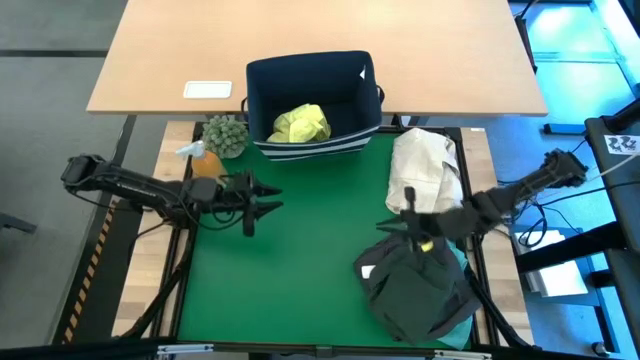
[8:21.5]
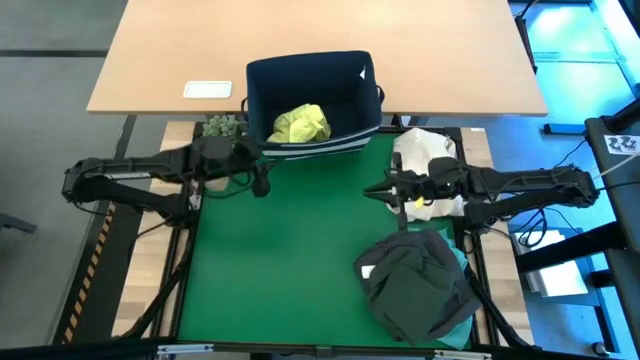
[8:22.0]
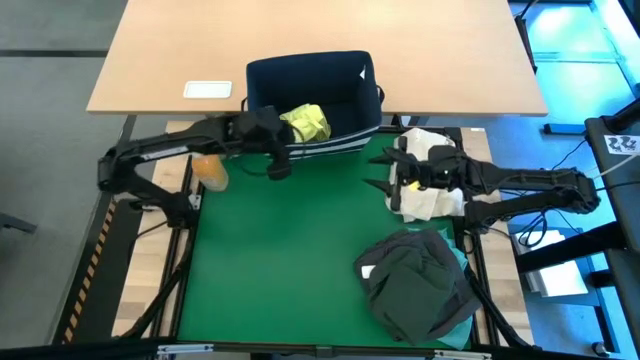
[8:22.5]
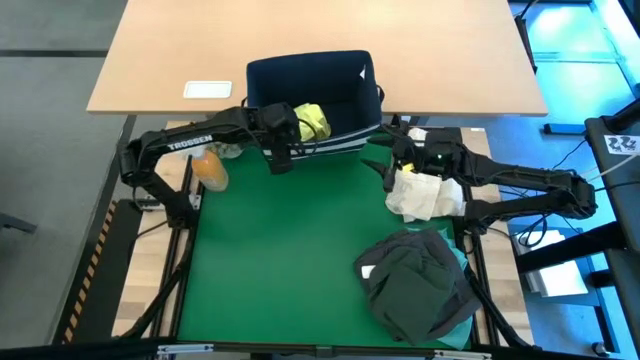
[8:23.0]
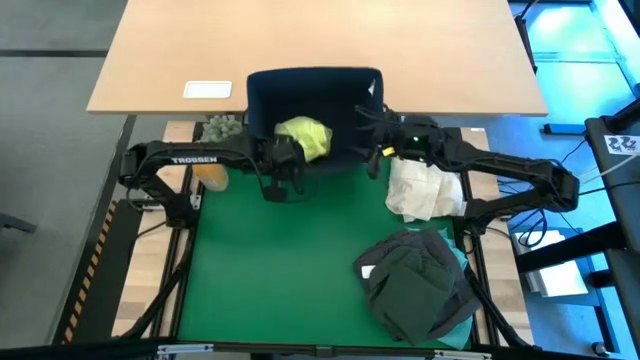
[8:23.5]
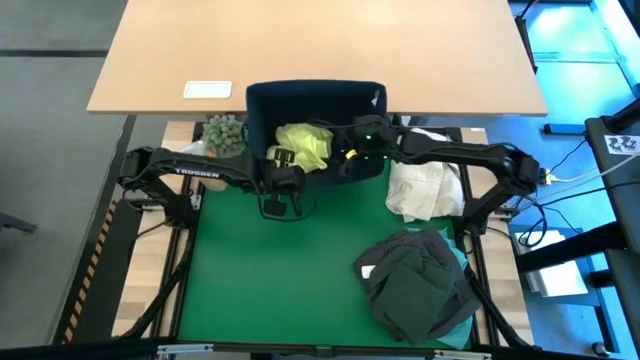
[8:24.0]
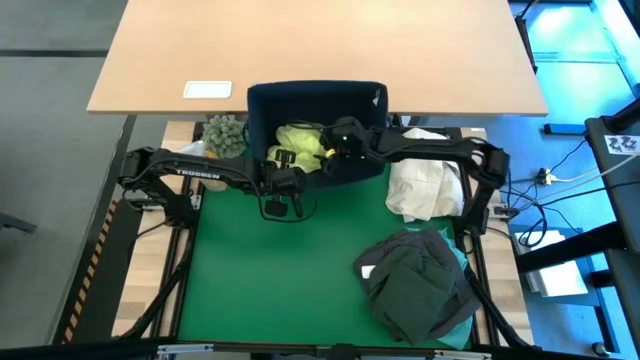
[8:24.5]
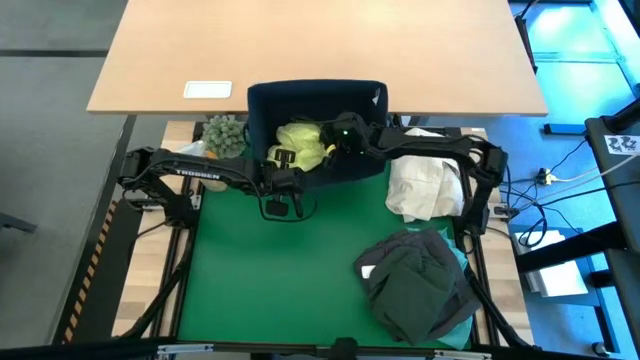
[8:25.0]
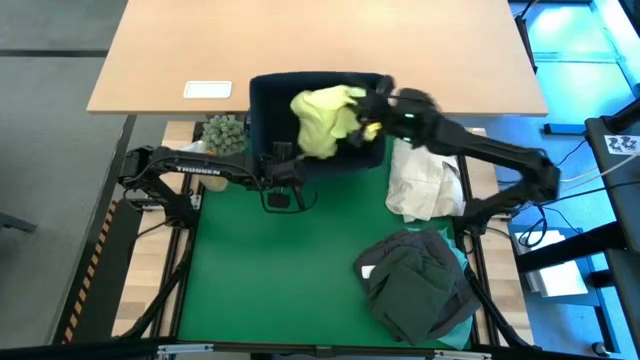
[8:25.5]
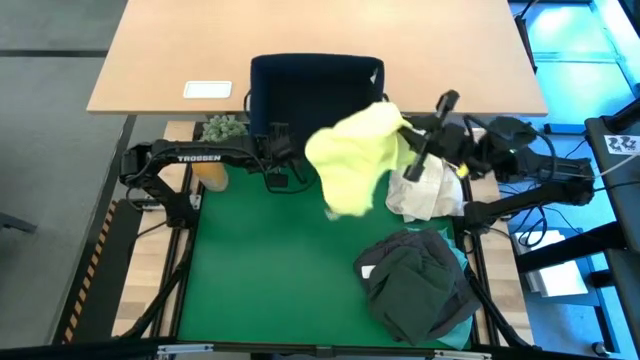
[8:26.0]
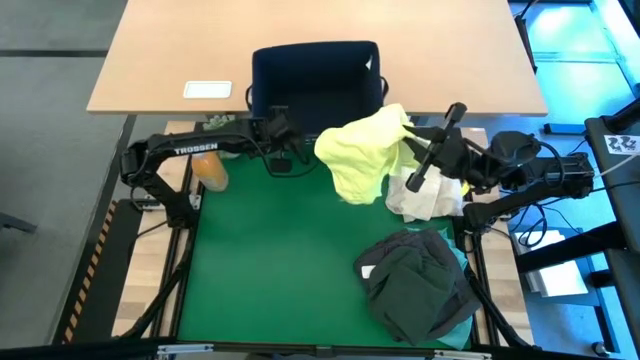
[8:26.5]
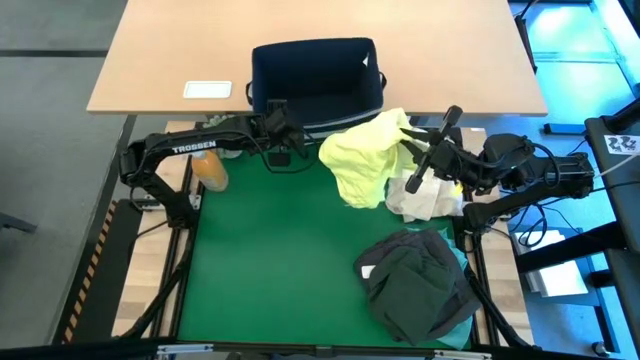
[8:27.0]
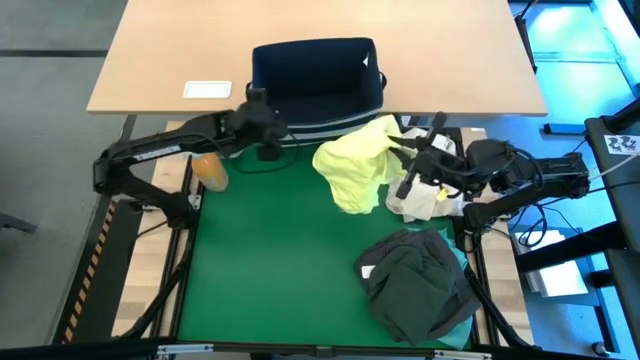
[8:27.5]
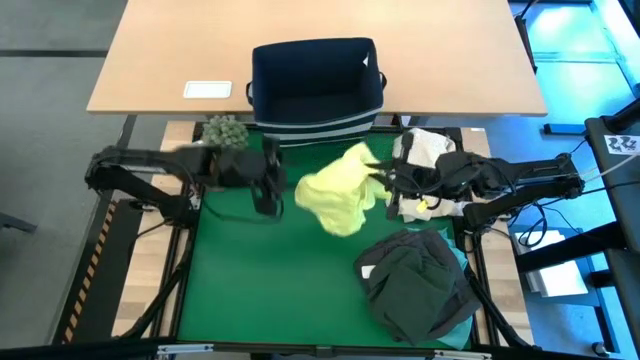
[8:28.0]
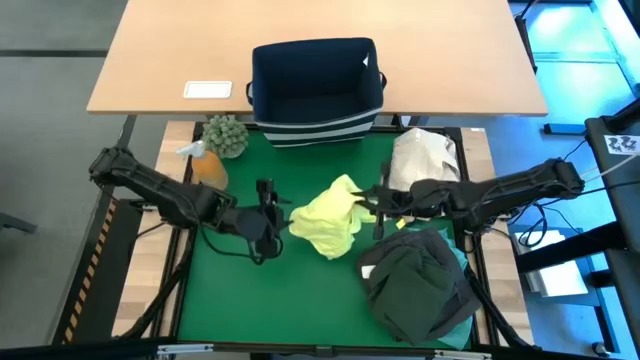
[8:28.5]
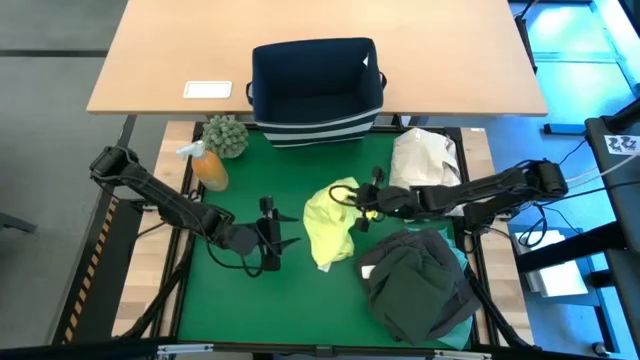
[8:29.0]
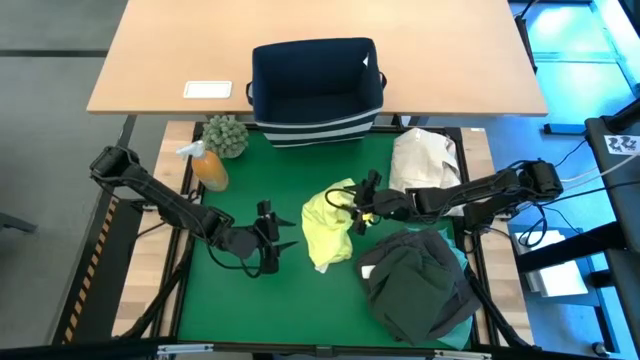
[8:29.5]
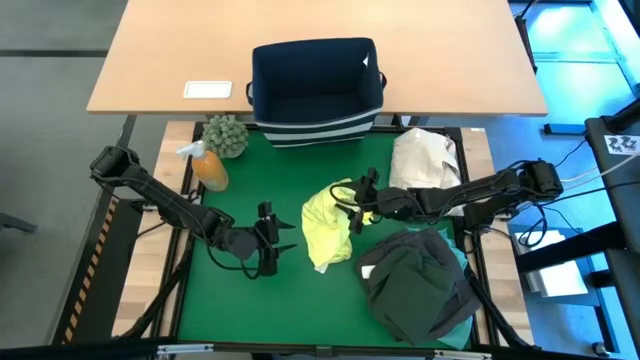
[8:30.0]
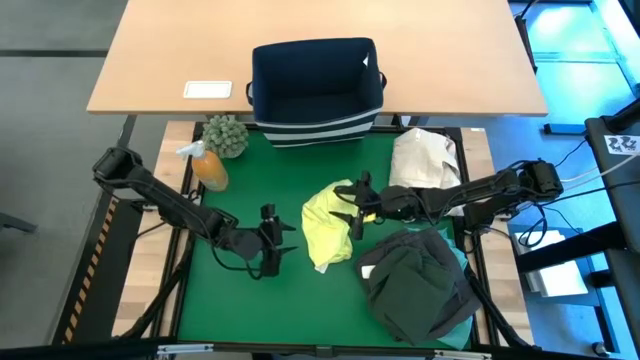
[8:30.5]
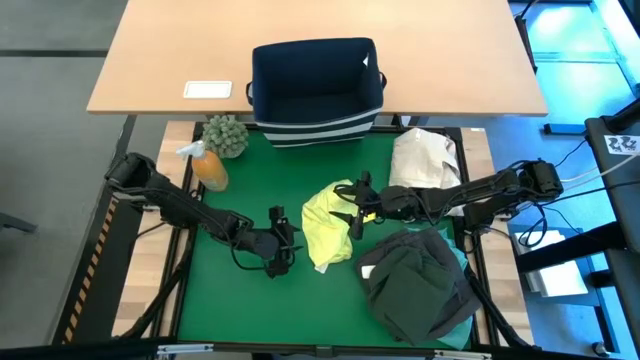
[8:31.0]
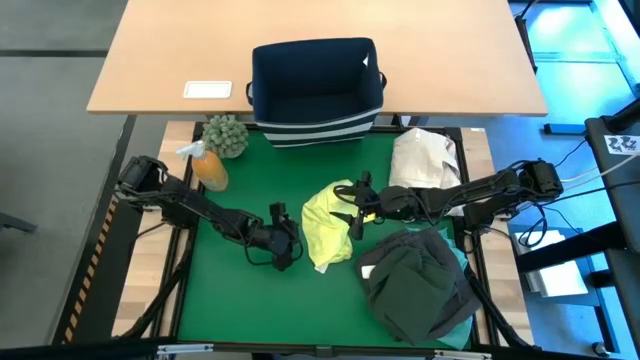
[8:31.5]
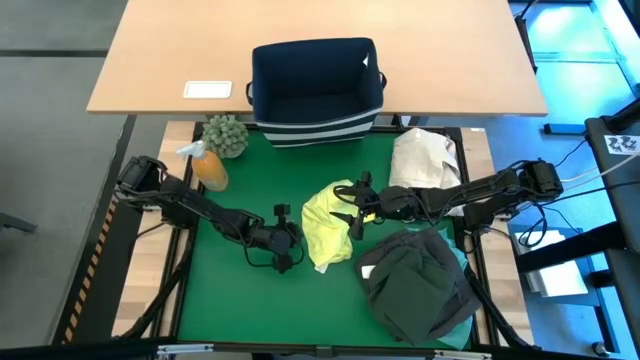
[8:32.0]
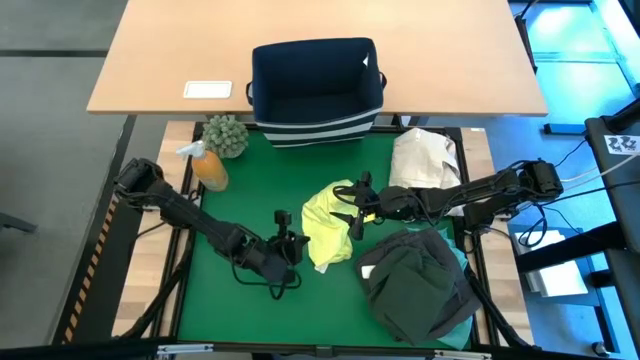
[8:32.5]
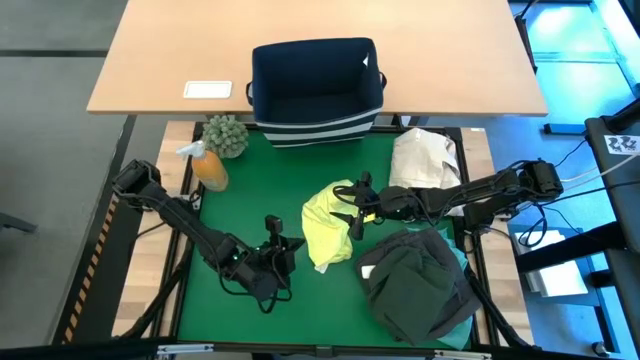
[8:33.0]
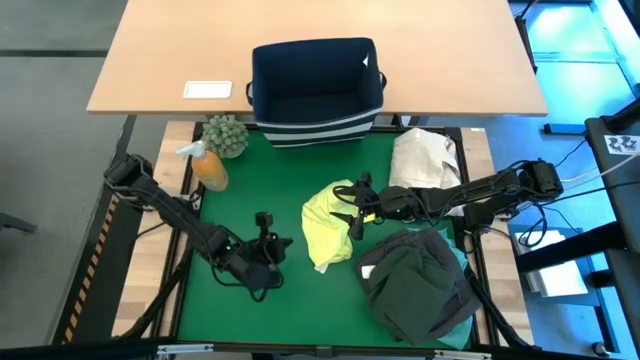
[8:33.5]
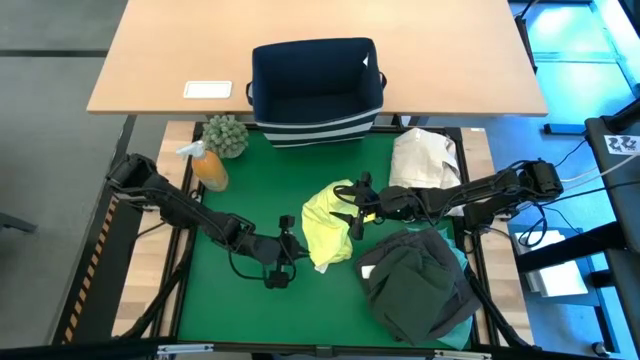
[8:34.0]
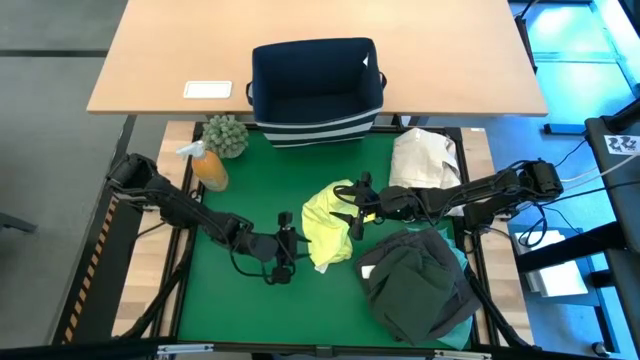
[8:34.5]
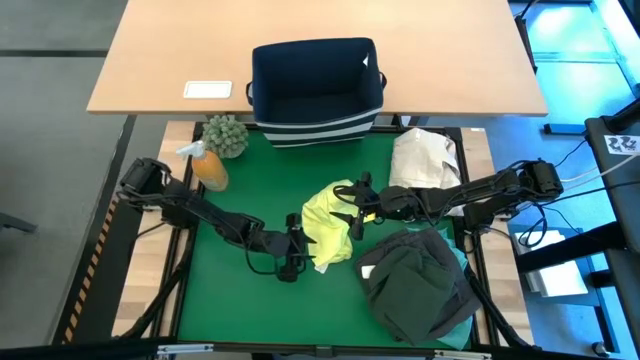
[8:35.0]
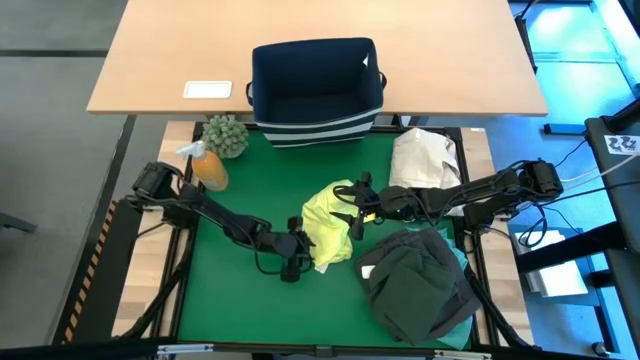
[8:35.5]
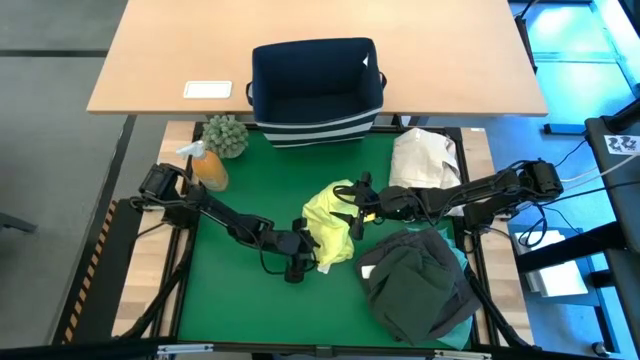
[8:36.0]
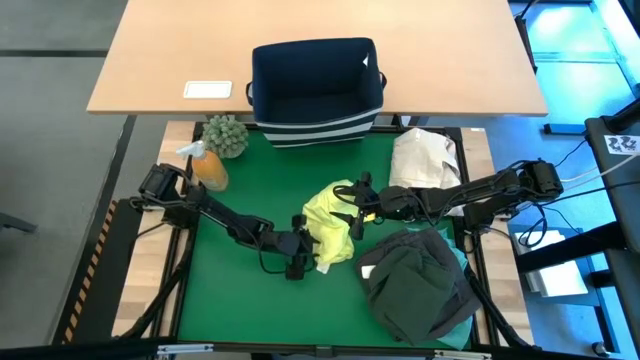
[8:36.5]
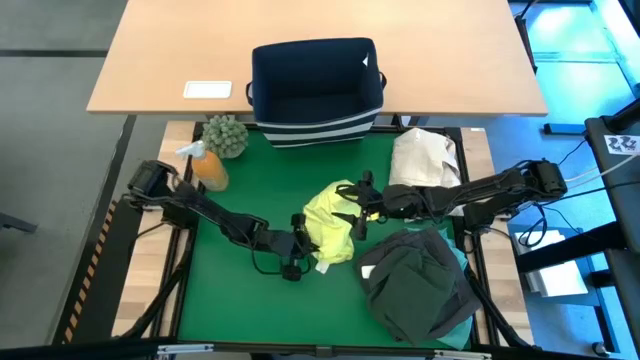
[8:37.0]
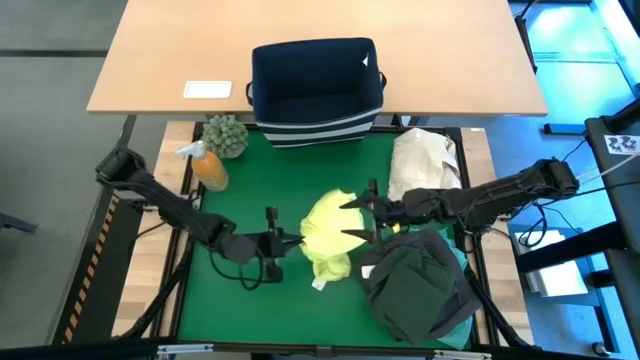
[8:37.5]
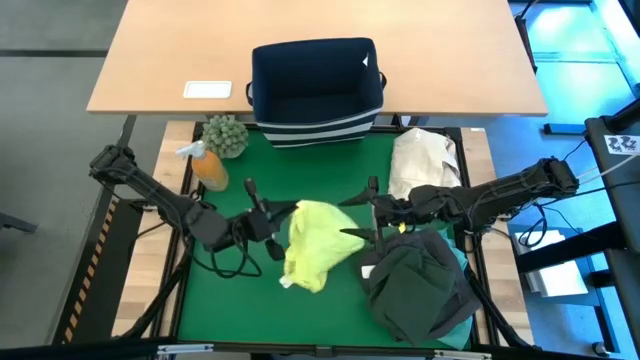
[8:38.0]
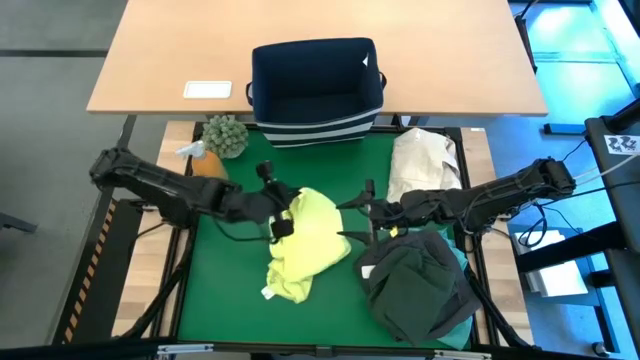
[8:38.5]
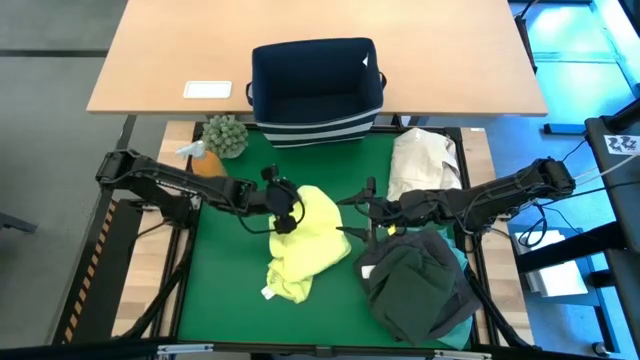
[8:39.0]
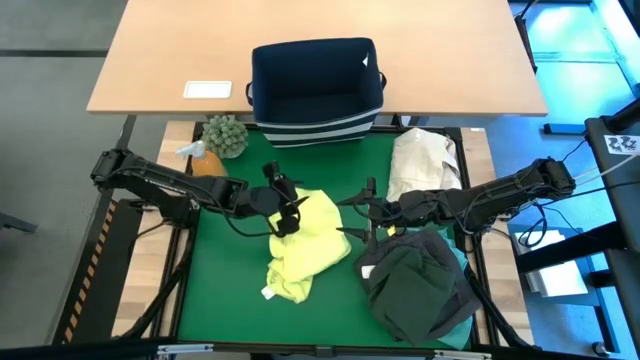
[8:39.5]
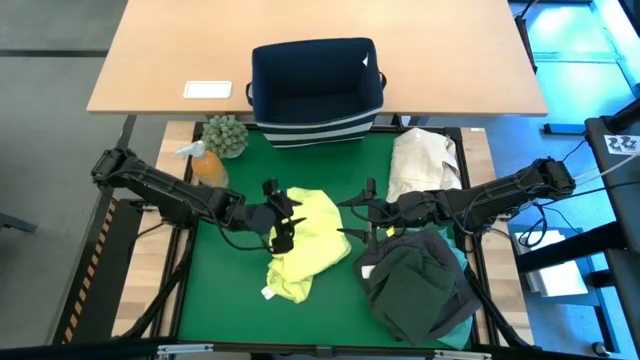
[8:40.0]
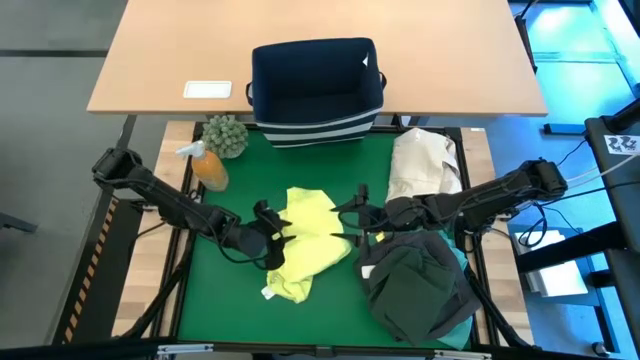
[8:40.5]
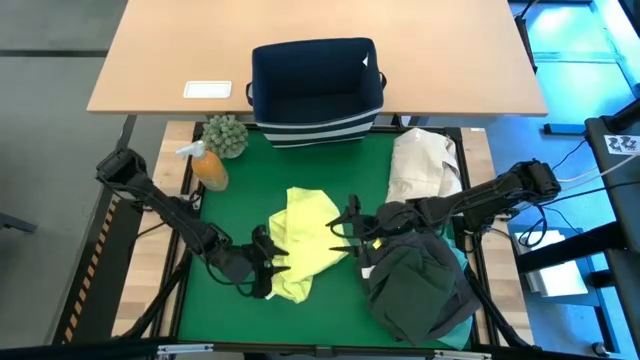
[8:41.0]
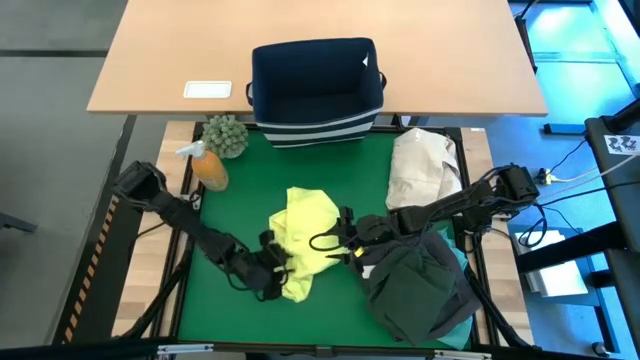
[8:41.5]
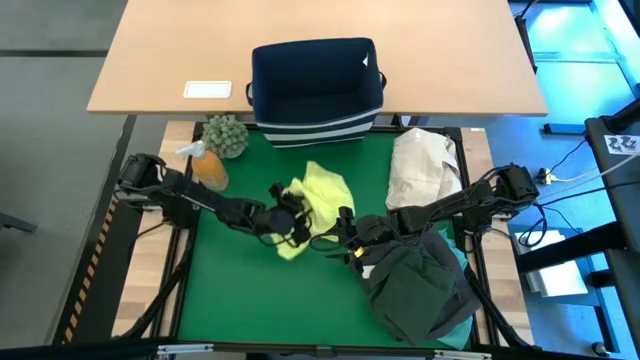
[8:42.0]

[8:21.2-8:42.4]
Task: Fold laundry
Fold the yellow shirt on the table
